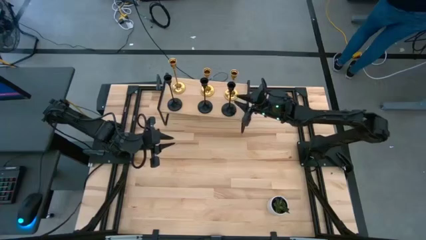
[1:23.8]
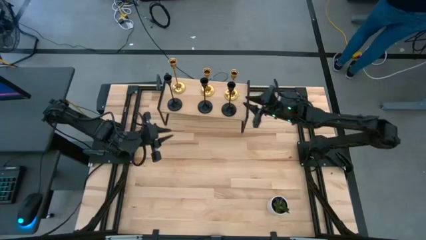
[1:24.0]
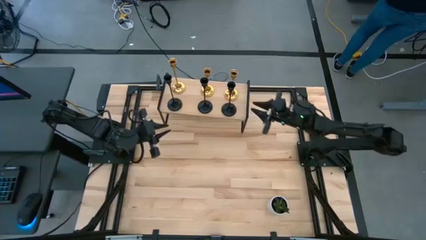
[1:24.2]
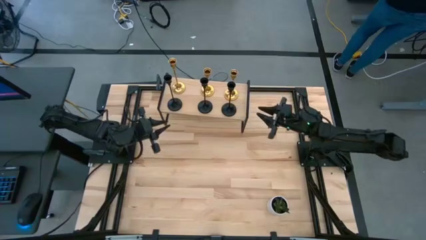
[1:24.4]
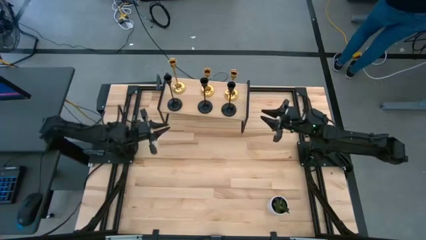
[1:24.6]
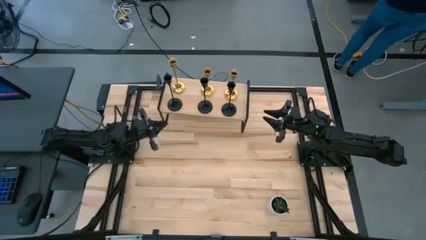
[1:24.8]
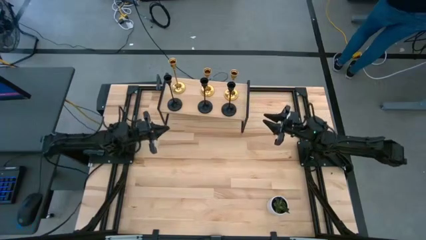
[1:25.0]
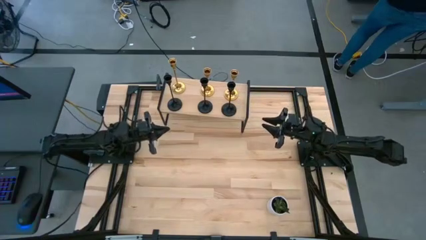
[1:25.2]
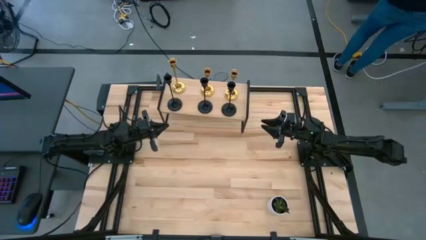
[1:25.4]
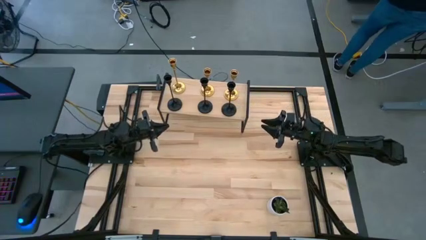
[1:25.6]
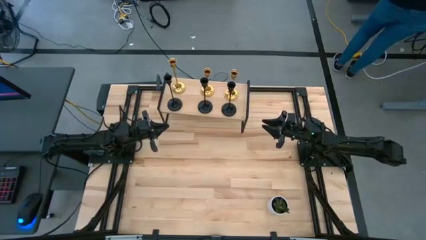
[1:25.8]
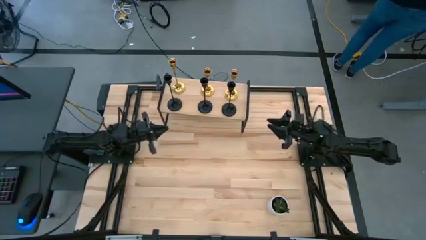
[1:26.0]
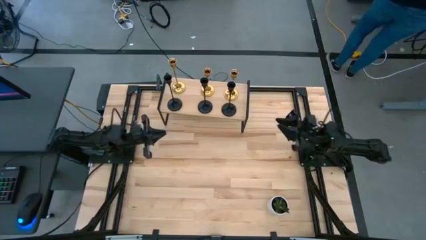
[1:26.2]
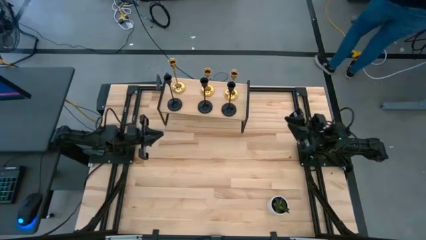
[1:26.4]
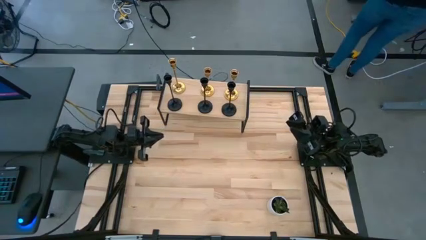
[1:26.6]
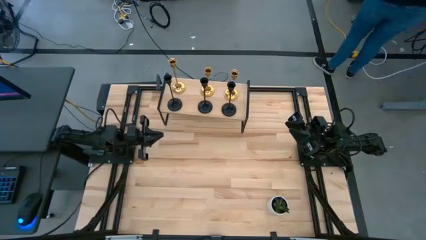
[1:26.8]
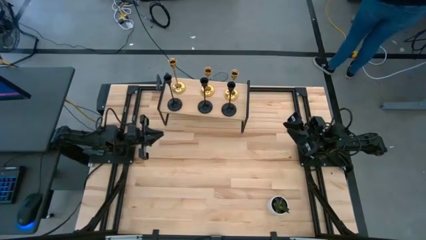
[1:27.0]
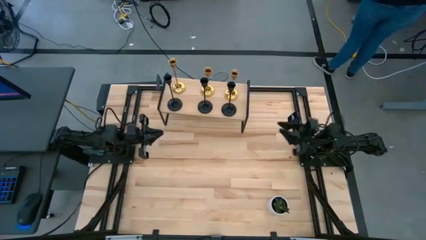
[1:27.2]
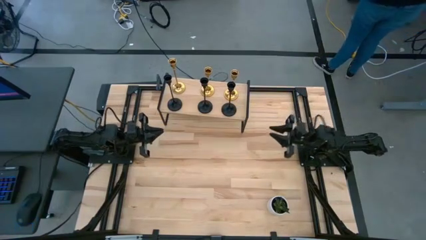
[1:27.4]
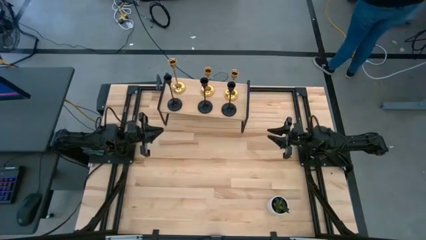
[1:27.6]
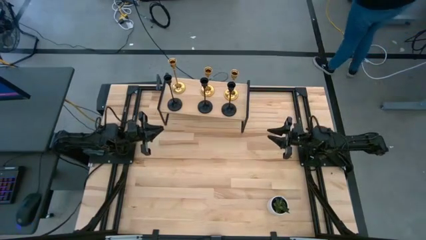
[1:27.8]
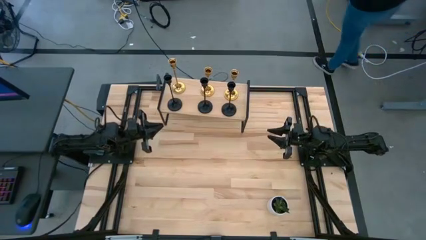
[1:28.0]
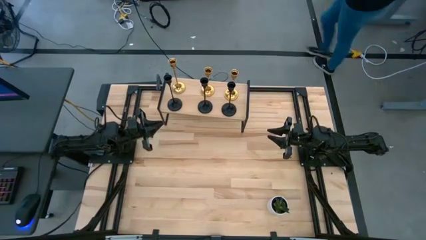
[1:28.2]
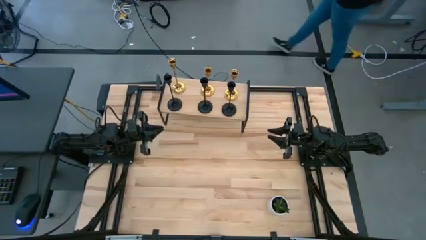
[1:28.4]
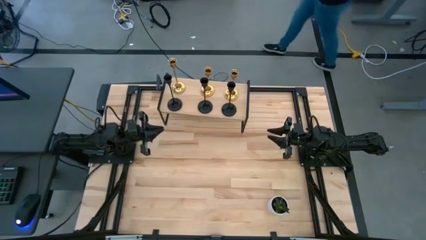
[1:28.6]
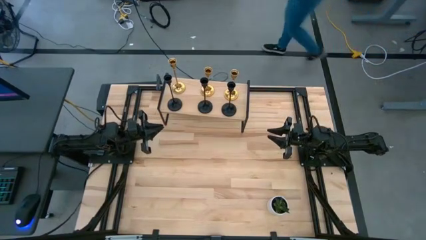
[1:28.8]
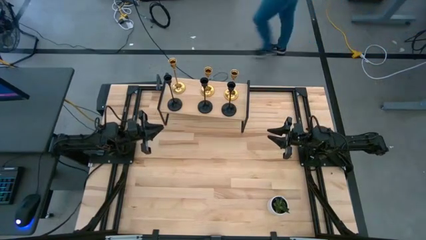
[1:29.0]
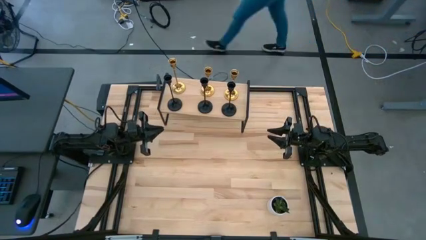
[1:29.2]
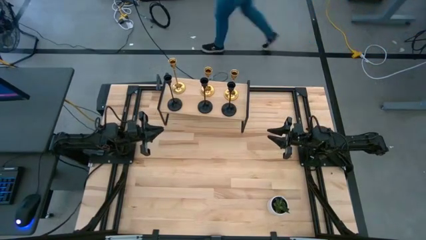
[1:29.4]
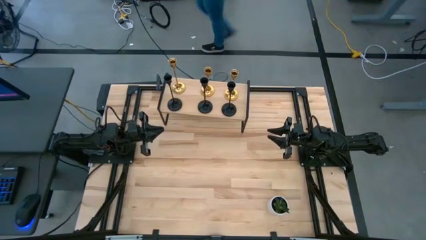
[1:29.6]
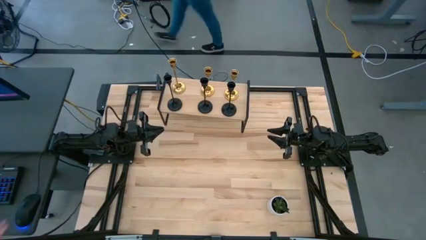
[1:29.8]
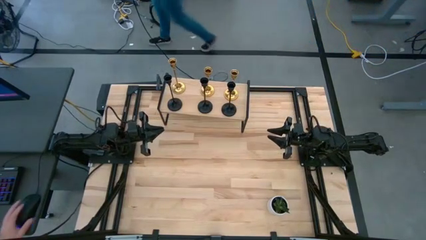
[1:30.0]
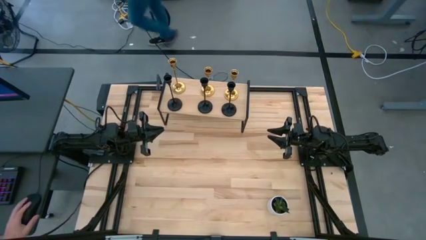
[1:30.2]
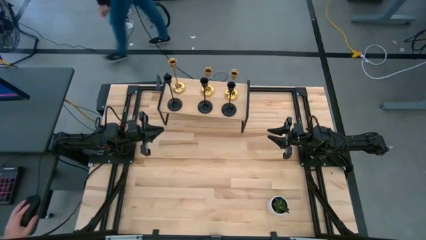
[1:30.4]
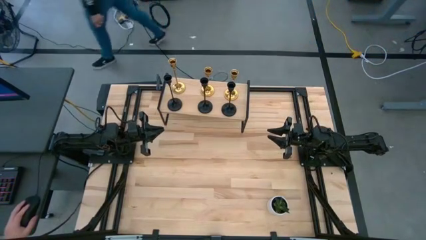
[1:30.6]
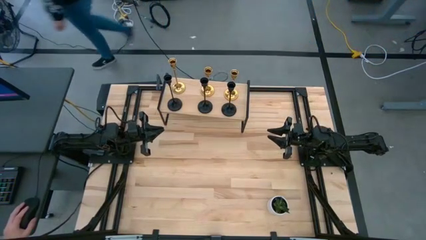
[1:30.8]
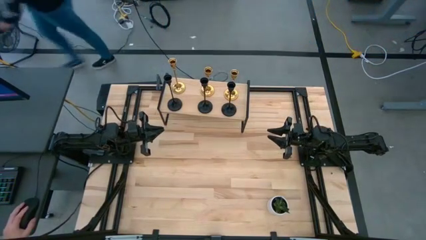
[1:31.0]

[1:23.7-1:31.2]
Task: Pick & Place candle stick holders
Return to Home Position

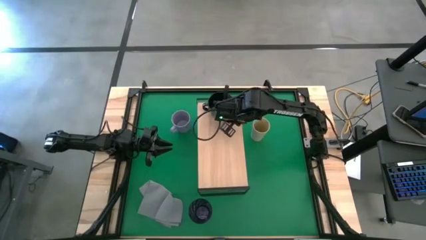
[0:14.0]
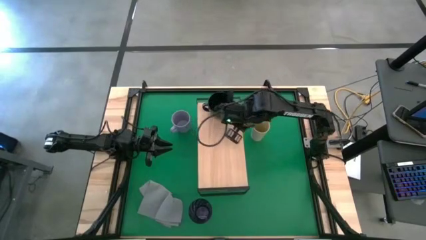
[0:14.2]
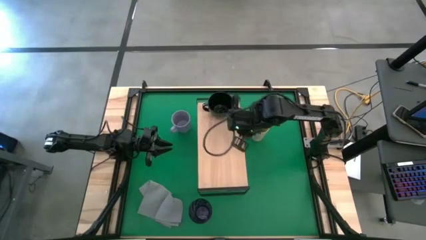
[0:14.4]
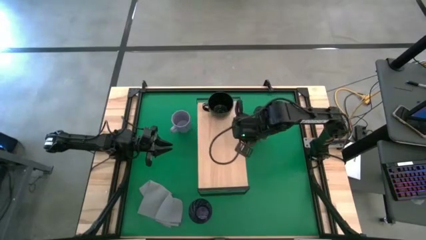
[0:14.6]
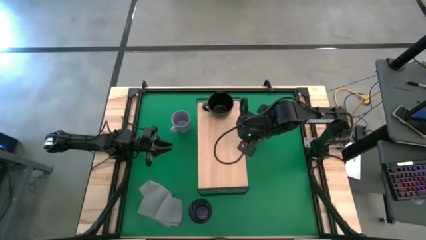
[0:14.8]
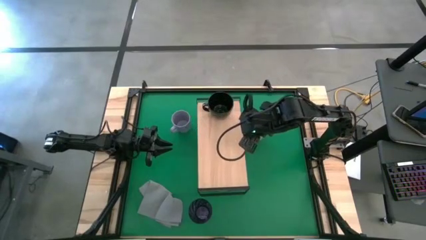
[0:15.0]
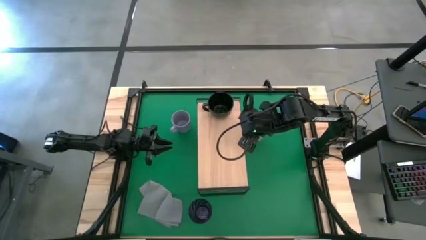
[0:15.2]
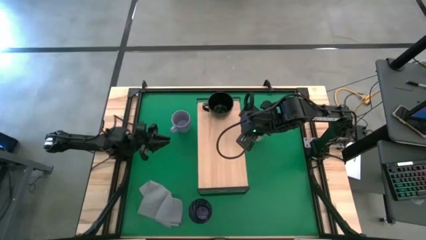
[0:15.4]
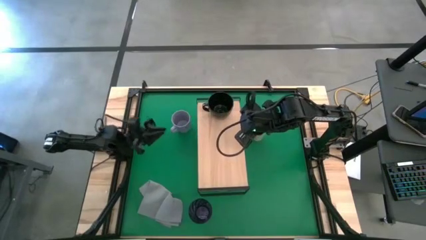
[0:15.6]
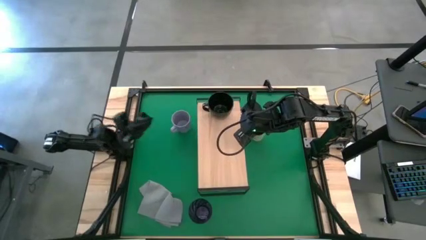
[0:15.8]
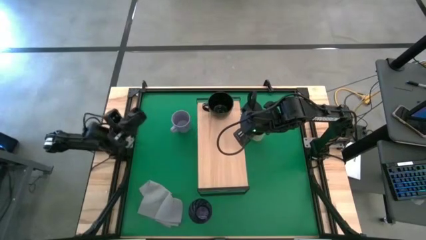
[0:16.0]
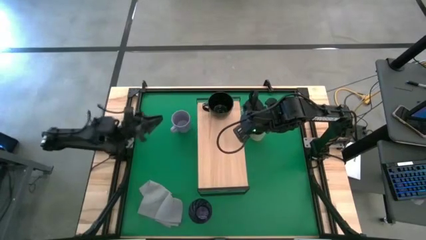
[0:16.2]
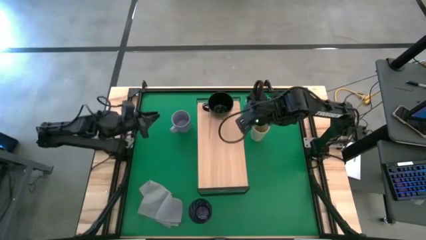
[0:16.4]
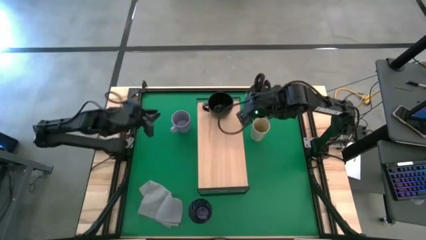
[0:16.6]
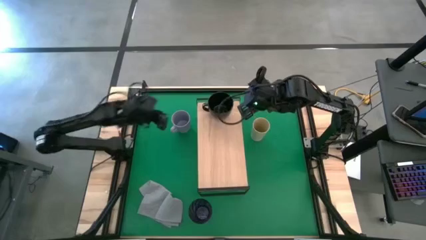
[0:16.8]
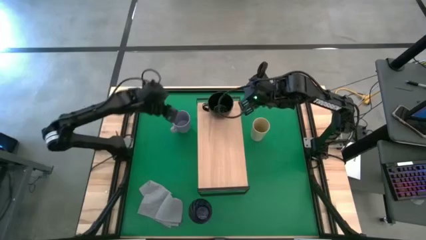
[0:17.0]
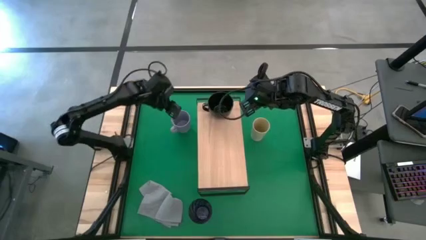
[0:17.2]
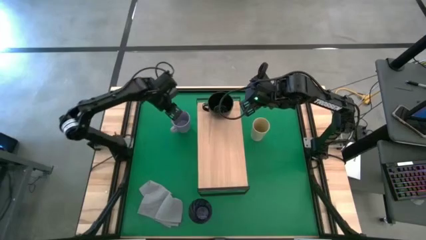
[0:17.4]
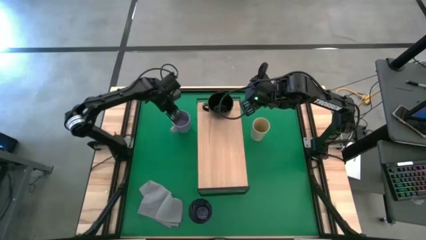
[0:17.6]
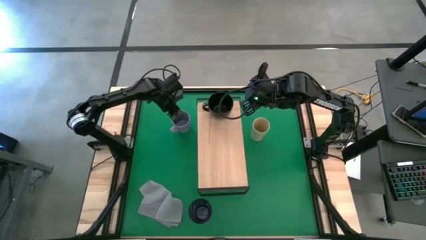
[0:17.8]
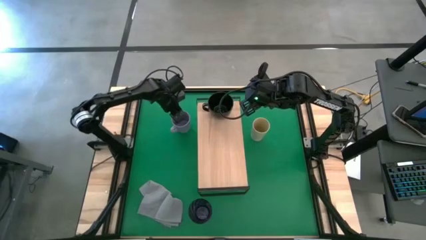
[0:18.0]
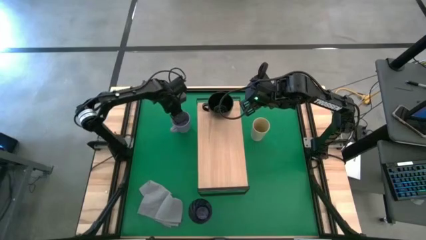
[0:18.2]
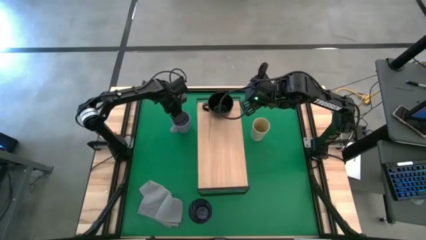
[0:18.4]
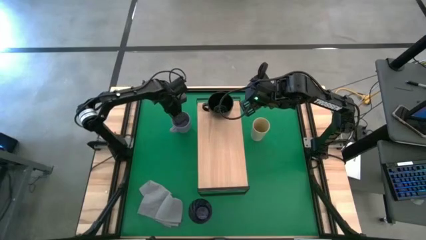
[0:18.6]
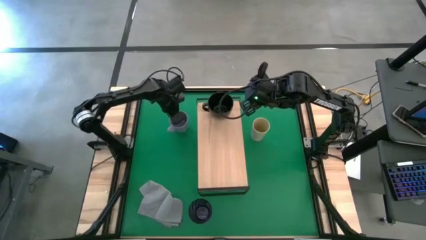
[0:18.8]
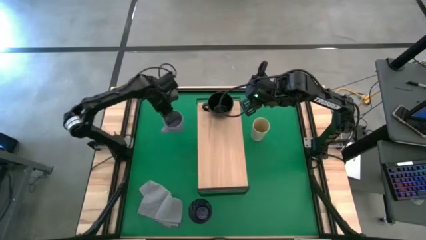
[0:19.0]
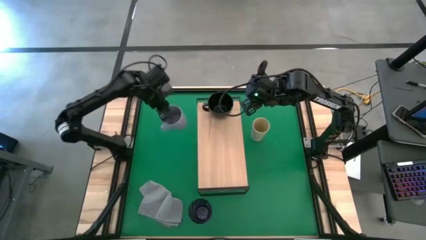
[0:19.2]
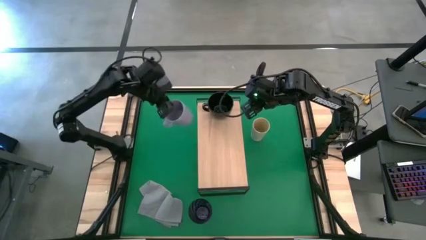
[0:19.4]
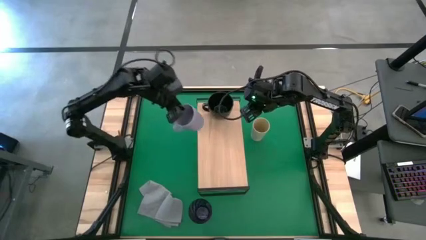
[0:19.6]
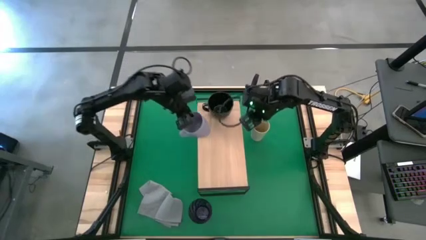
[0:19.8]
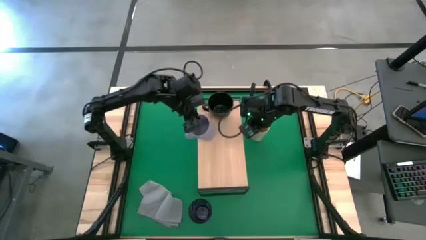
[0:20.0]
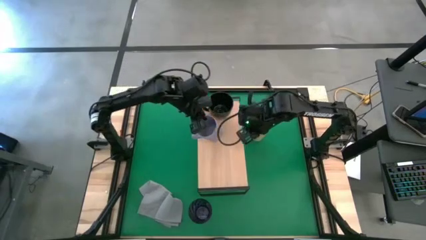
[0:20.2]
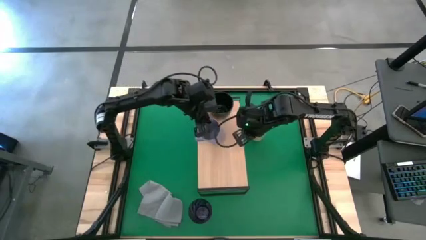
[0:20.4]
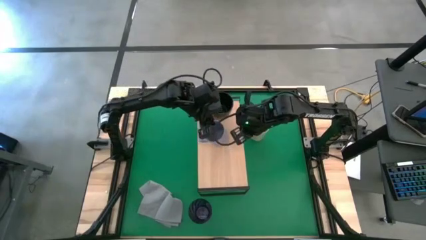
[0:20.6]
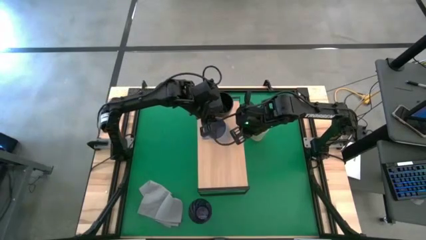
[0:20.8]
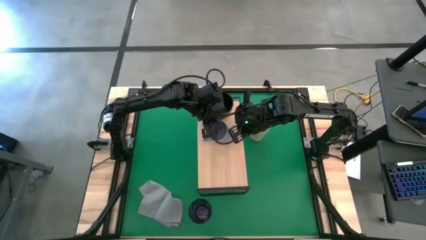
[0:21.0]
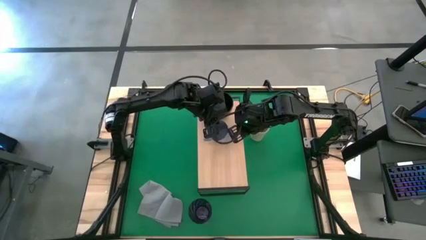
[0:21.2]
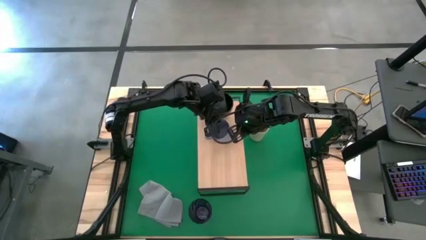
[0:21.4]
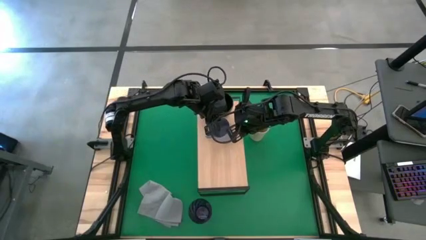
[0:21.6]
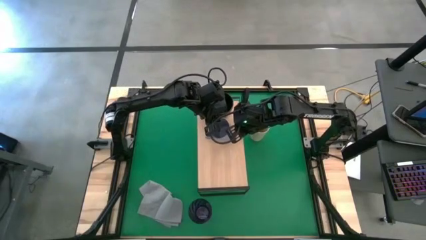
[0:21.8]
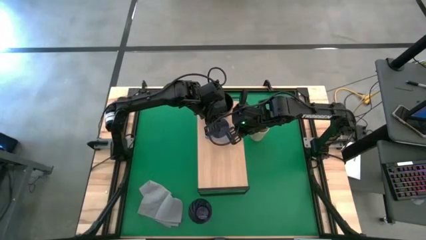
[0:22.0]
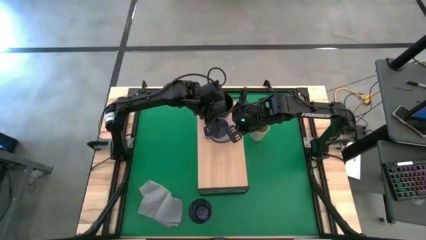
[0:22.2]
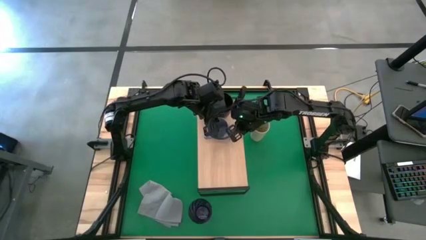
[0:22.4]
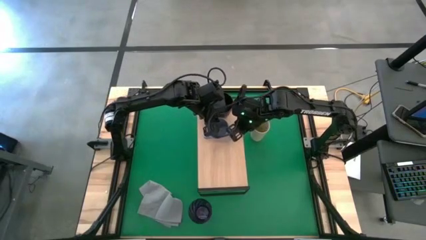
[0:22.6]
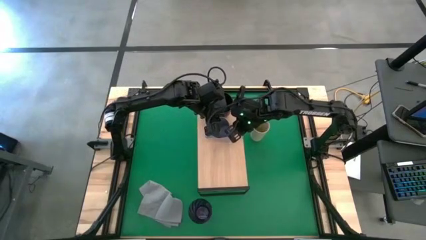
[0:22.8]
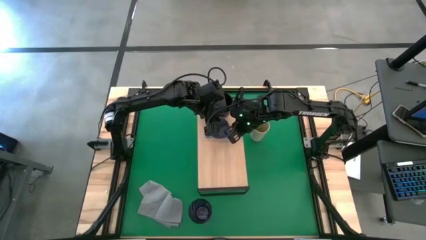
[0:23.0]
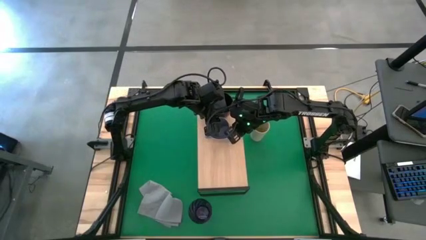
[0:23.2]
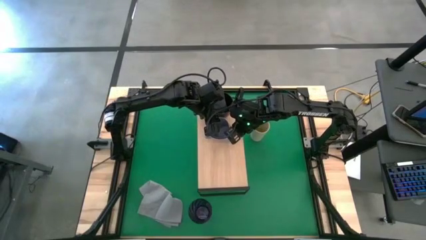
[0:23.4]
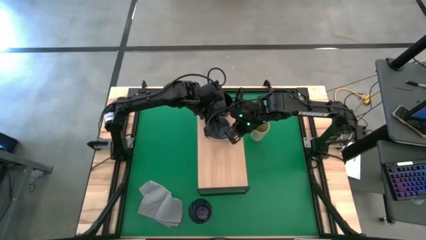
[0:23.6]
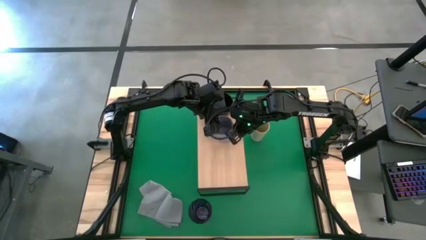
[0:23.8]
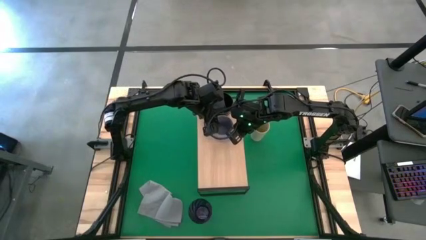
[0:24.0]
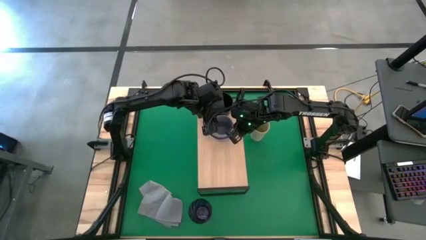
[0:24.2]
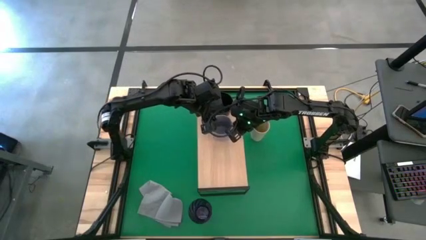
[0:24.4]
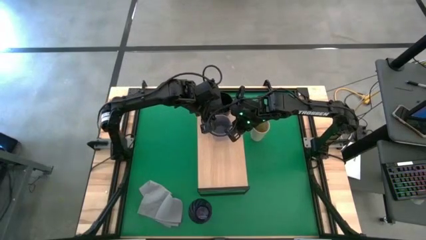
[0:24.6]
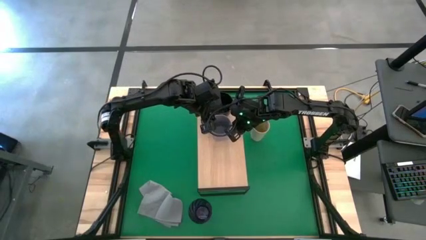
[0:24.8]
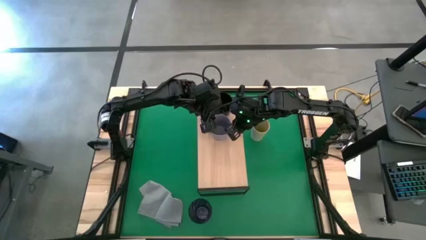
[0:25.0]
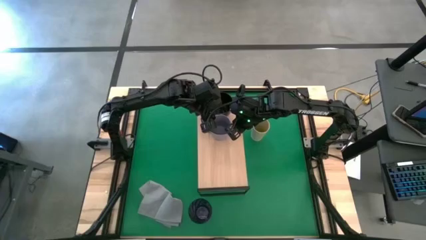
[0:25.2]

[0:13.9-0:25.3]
Task: Stack small to large cups/mugs on shelf
Put the violet cup on the shelf
